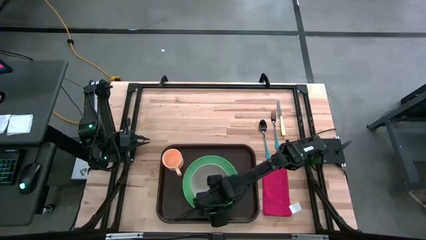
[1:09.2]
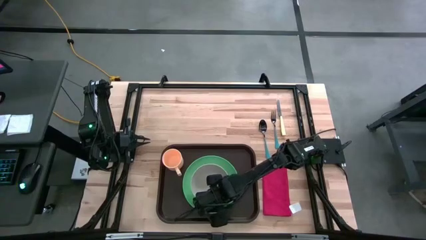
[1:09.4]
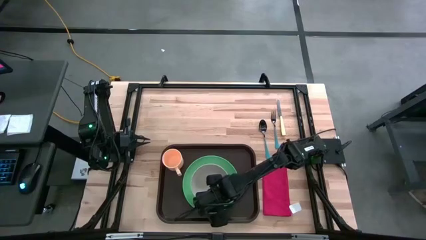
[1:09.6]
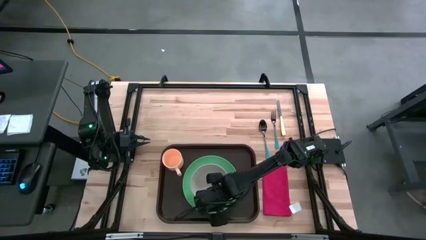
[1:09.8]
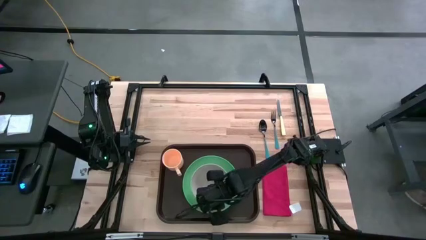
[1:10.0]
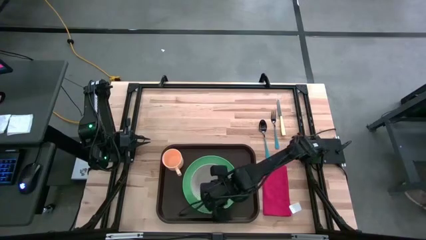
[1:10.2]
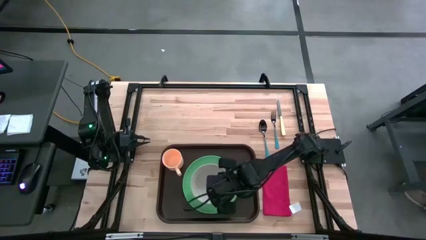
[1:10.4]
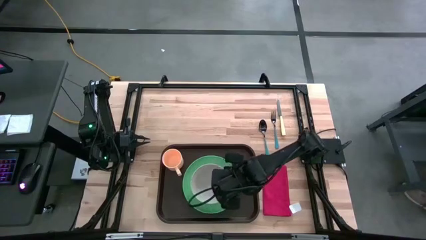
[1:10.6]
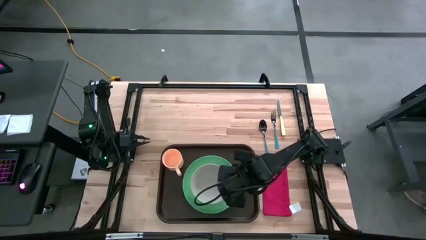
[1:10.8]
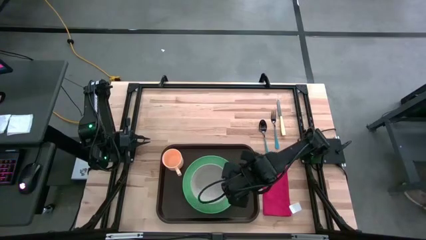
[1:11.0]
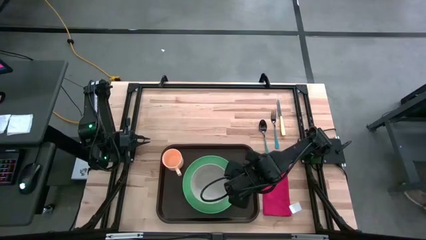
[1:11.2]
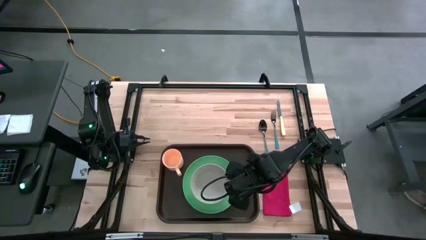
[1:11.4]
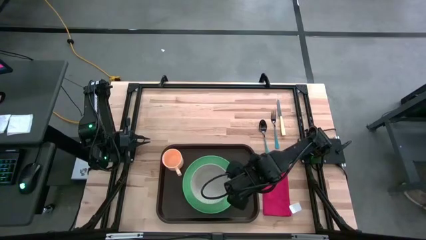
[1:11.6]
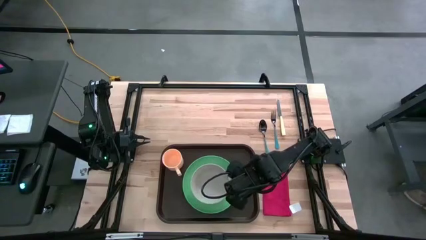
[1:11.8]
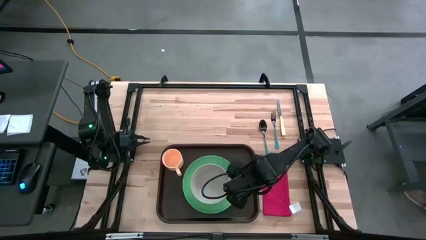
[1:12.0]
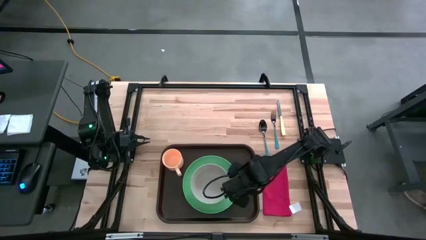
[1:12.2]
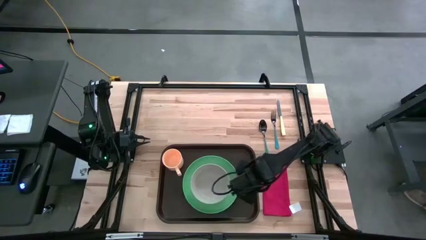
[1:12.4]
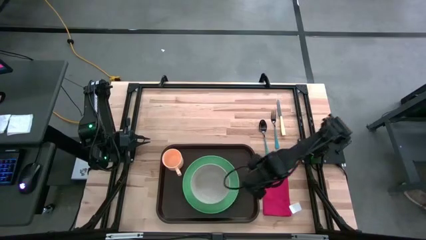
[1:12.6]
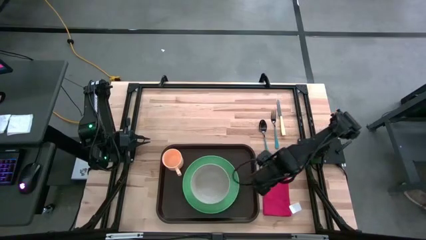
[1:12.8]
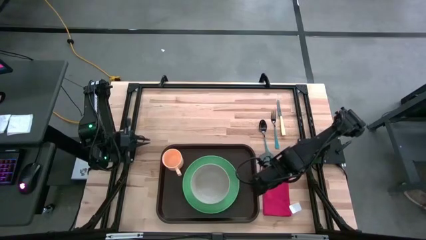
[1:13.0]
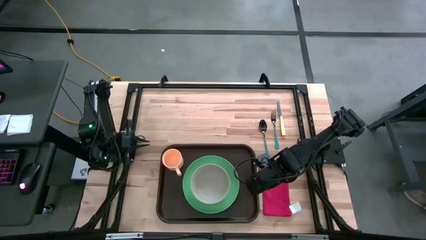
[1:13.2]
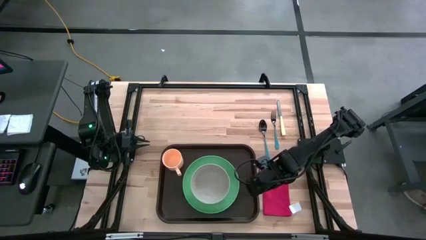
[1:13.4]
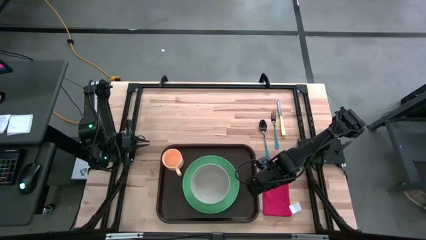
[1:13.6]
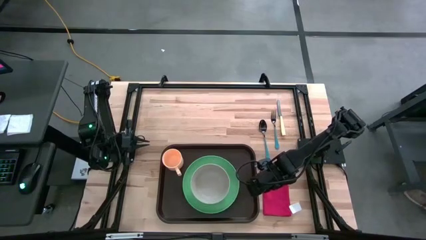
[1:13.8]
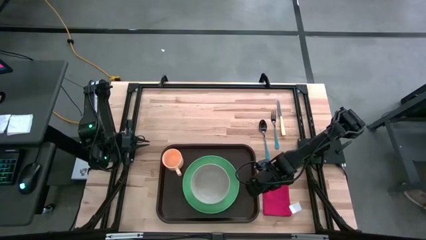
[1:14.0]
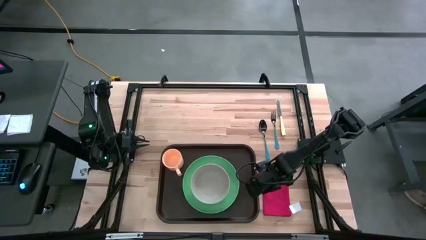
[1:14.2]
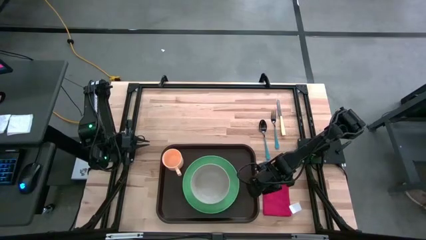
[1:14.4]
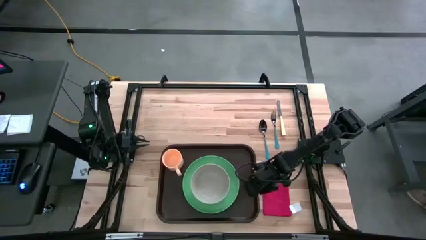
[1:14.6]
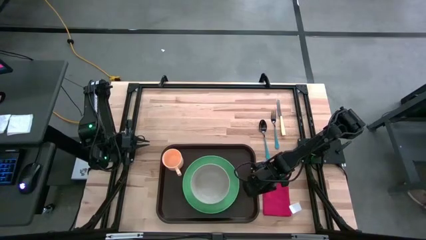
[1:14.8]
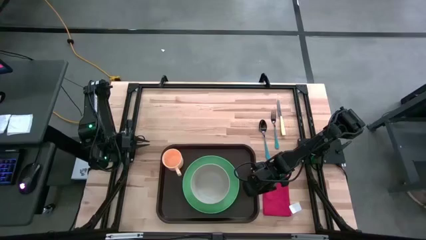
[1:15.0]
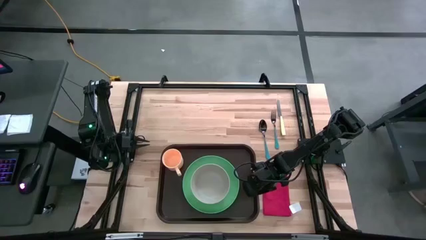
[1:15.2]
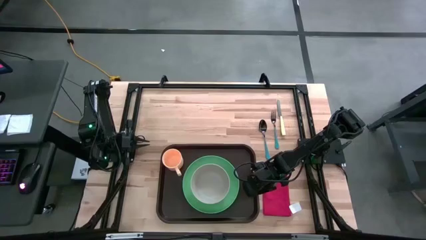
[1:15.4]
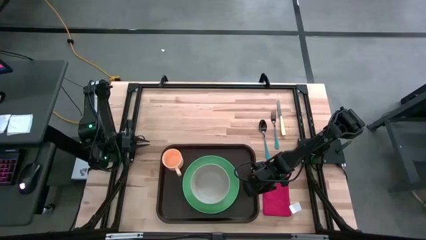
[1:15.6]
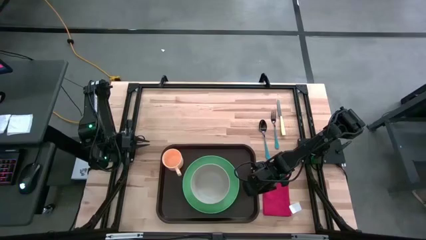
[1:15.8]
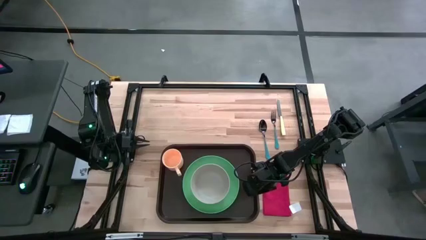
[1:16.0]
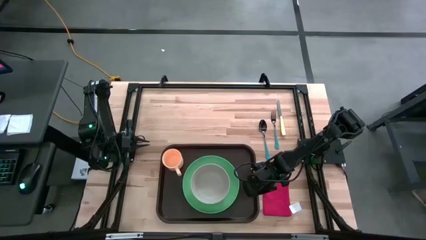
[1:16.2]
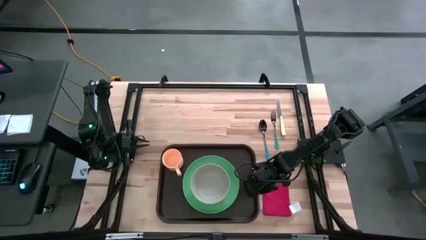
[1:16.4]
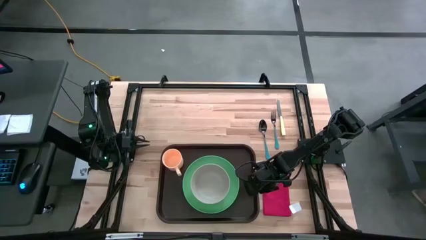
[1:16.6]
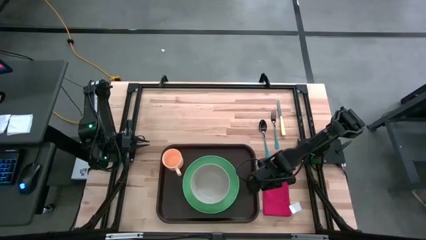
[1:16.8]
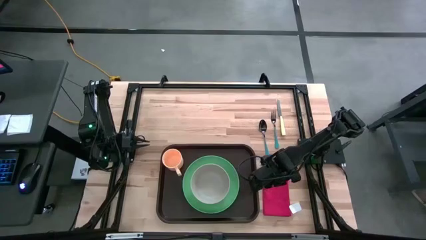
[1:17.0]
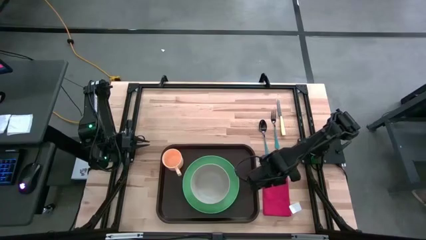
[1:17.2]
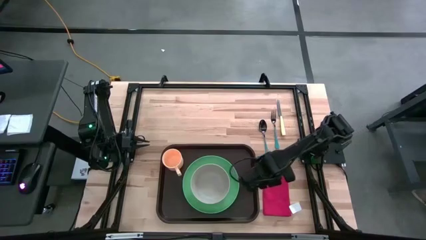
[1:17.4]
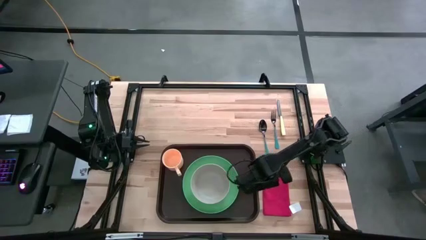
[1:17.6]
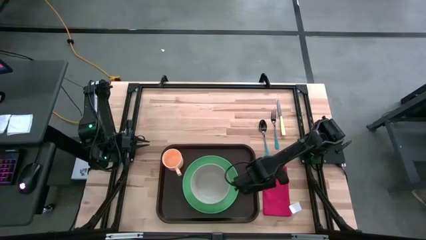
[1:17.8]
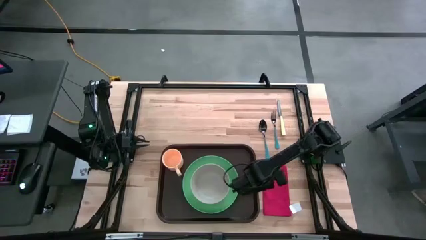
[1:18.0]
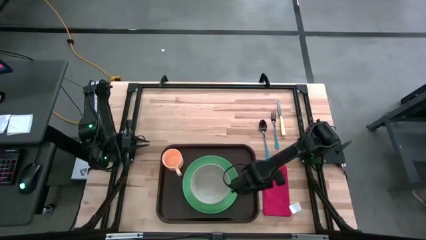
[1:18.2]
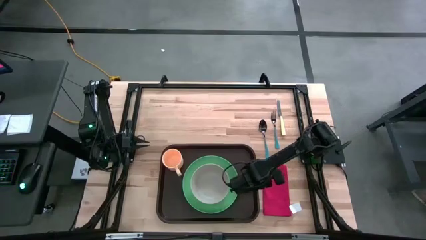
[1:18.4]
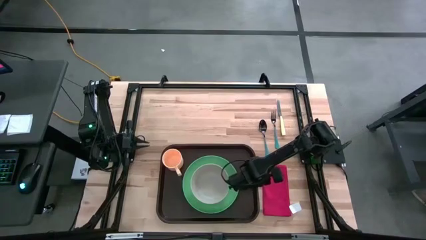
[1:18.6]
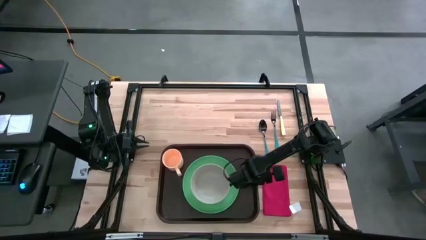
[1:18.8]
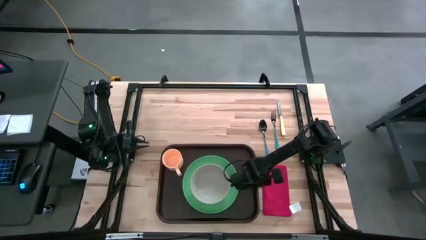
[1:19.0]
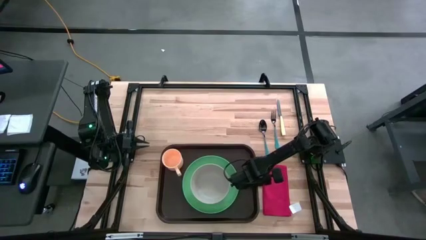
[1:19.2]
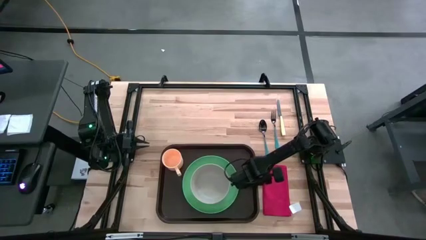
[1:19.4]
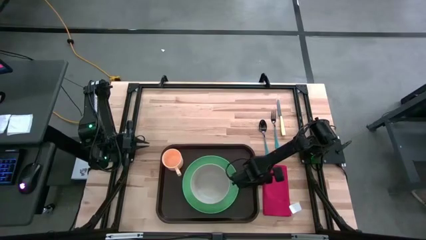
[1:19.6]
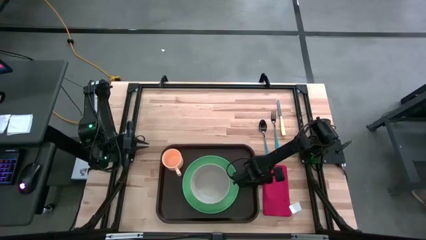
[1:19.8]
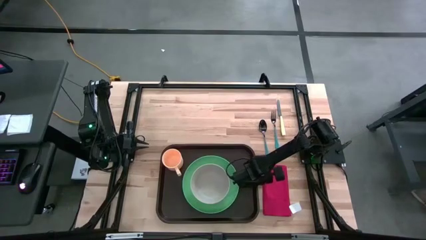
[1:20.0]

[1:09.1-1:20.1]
Task: Set up tray
Put the red napkin on the black serving tray to the right of the green plate

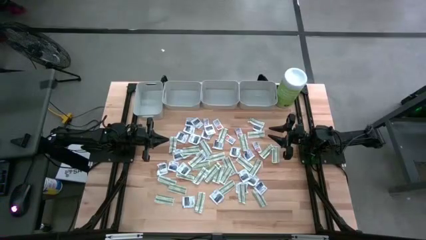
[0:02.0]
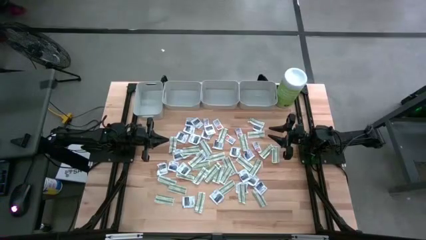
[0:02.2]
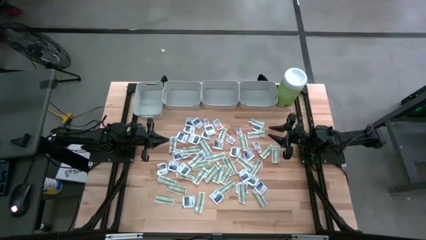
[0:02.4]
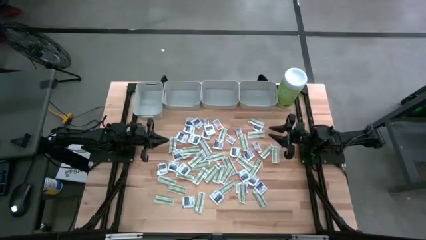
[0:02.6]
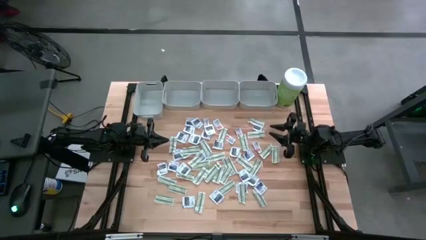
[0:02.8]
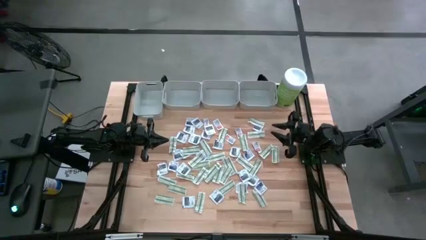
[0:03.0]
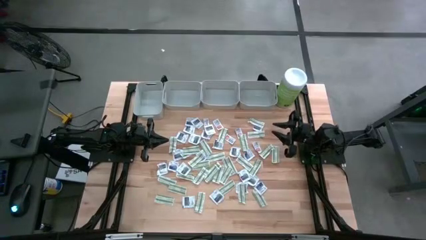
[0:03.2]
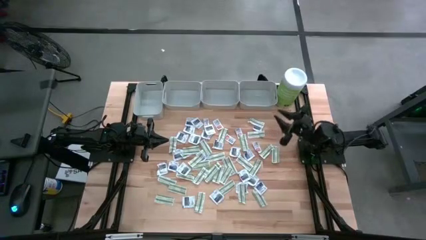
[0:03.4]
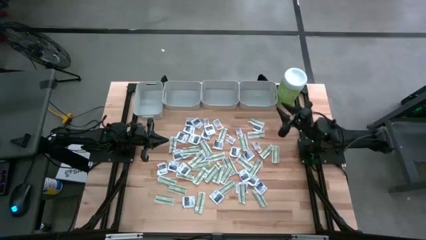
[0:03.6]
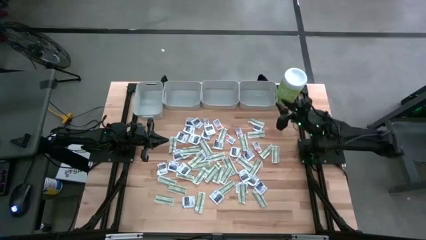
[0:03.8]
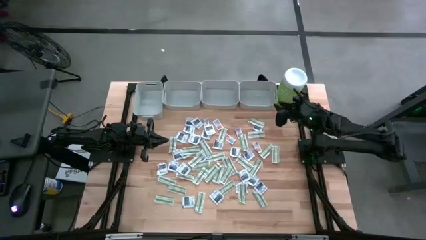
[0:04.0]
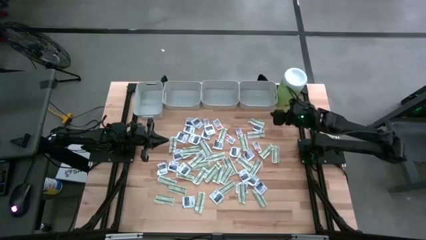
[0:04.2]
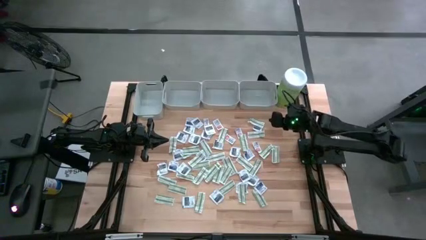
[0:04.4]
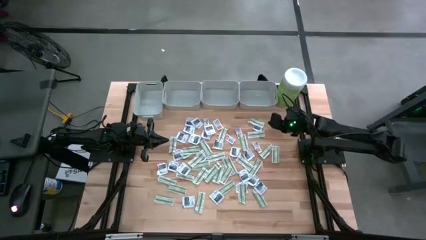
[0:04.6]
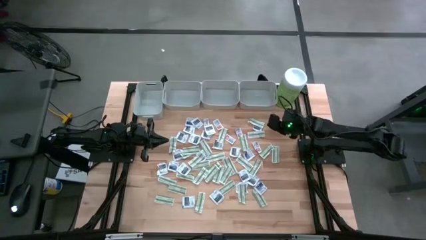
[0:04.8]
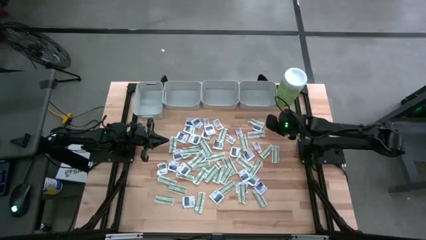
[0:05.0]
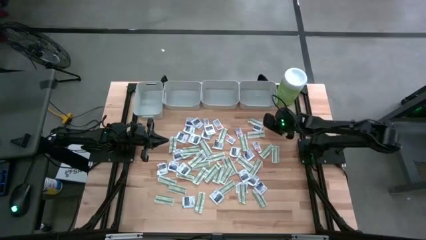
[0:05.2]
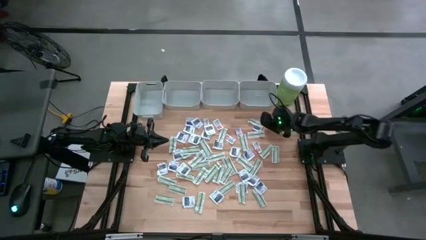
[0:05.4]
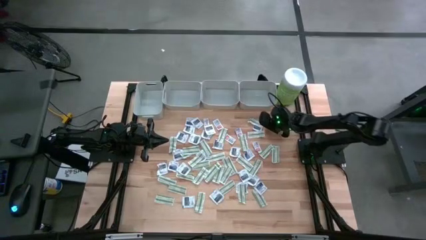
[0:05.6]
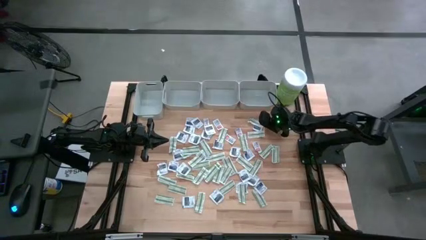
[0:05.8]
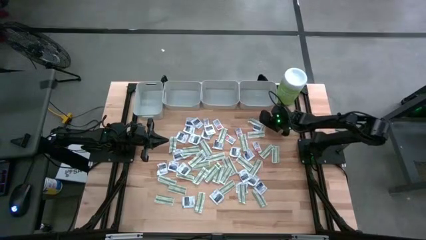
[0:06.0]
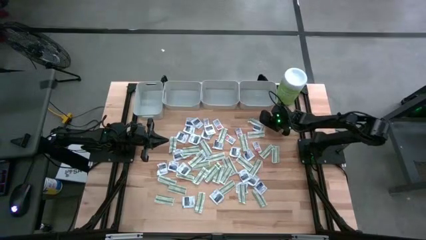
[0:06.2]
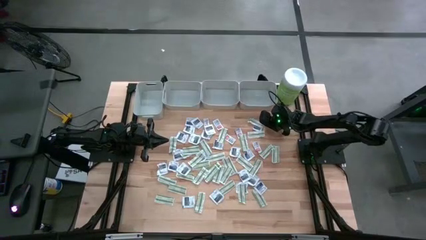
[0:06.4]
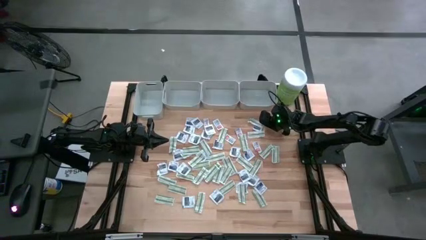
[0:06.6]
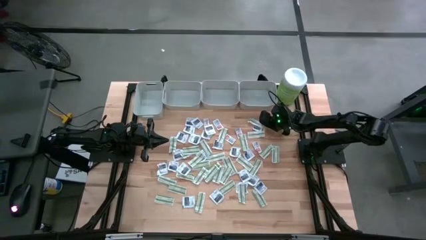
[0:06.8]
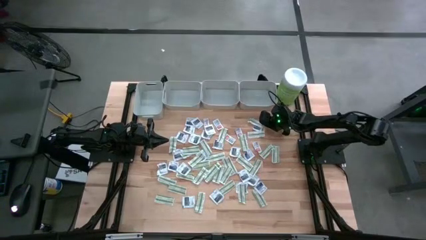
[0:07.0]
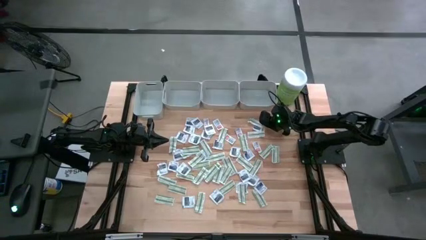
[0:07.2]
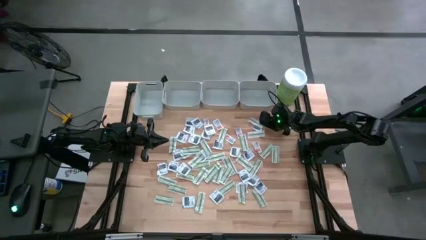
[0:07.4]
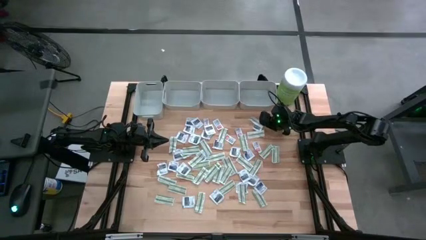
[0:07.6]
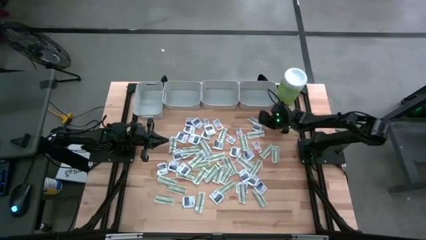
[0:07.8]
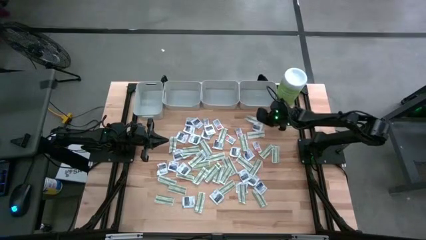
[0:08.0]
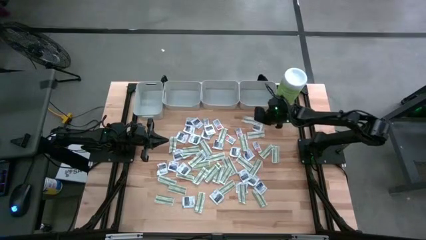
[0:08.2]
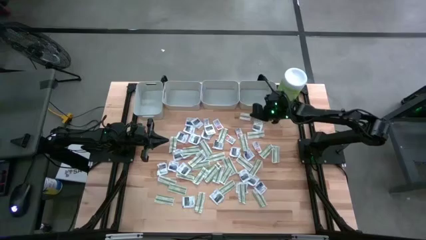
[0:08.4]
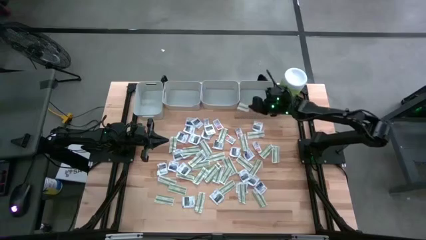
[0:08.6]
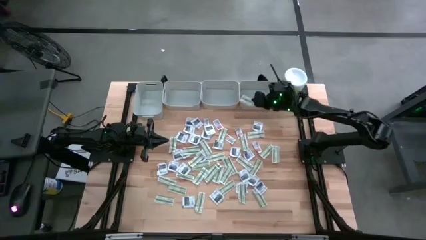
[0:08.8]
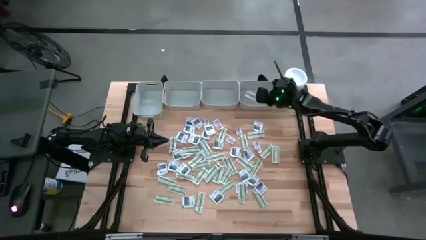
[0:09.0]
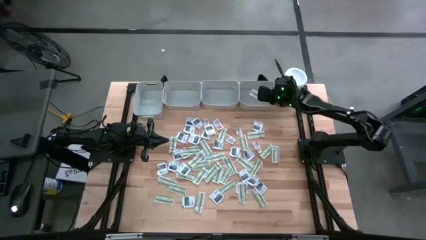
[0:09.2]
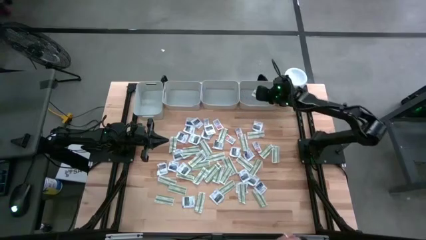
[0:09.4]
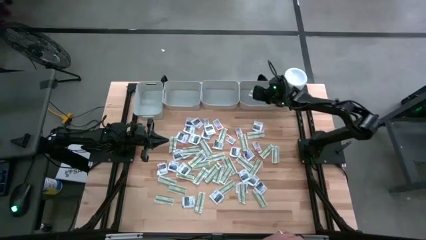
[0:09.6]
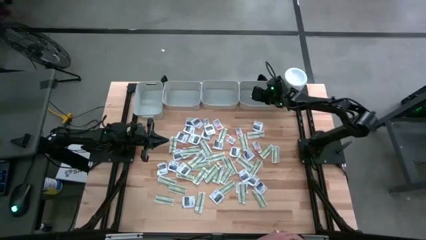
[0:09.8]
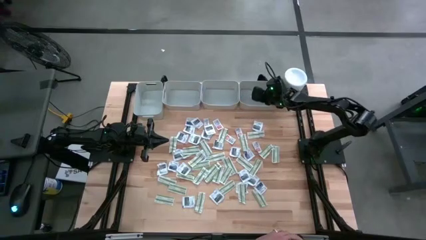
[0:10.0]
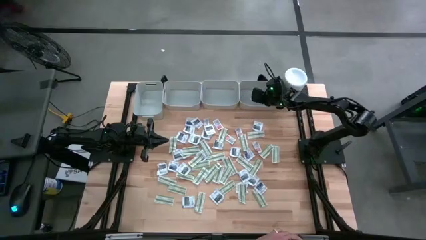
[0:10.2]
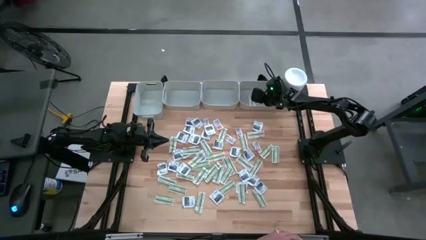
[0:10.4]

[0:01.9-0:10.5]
Task: Pick & Place First Aid Supplies
Put the green bandage into the right gray bin
